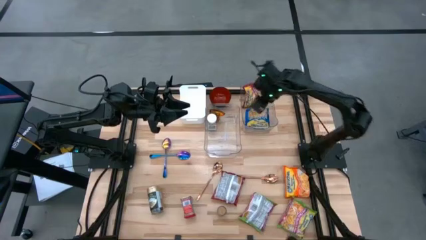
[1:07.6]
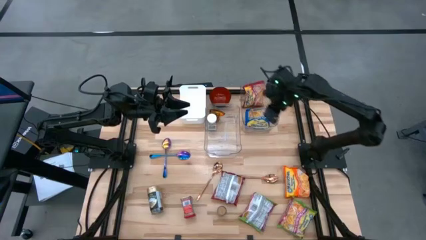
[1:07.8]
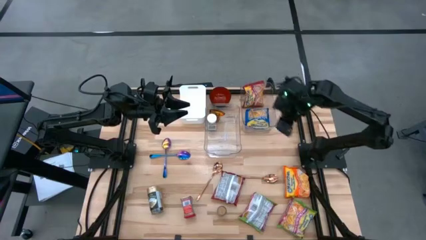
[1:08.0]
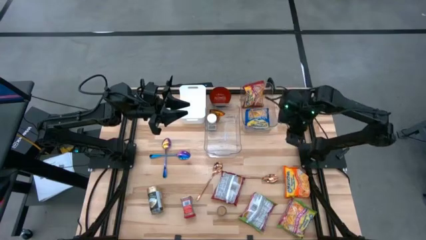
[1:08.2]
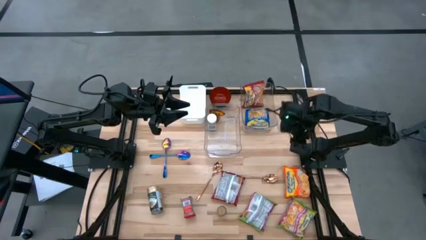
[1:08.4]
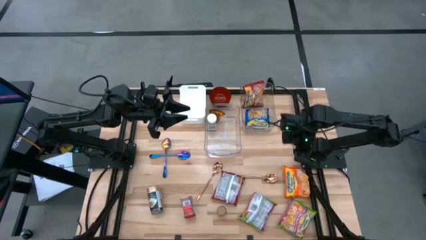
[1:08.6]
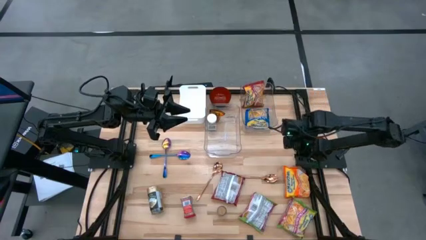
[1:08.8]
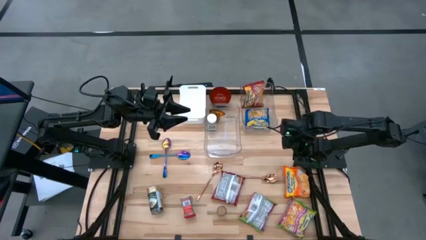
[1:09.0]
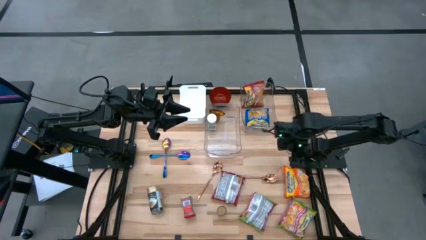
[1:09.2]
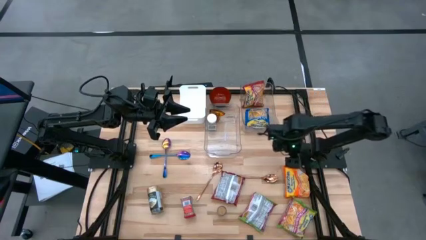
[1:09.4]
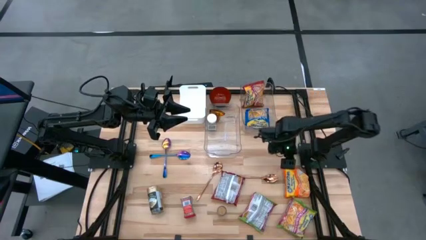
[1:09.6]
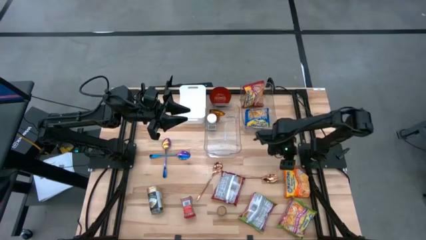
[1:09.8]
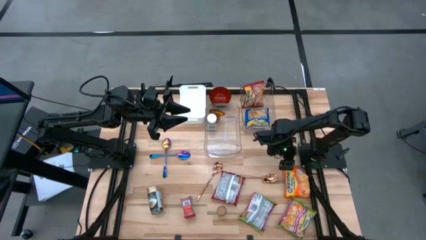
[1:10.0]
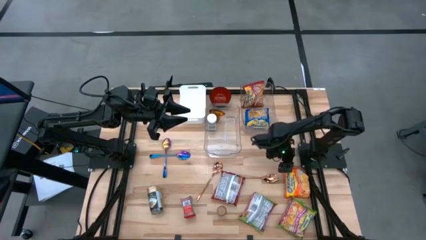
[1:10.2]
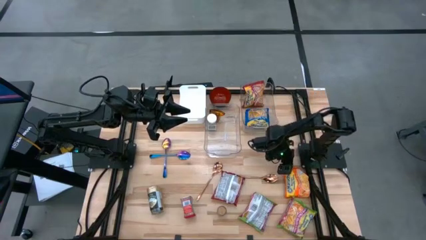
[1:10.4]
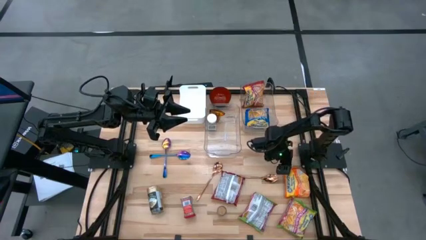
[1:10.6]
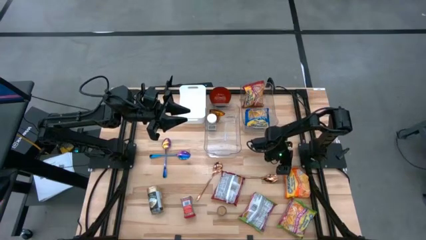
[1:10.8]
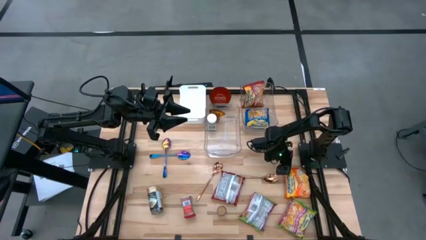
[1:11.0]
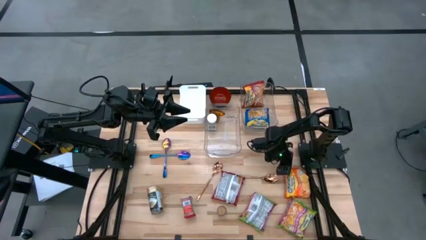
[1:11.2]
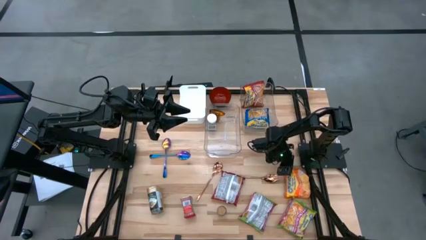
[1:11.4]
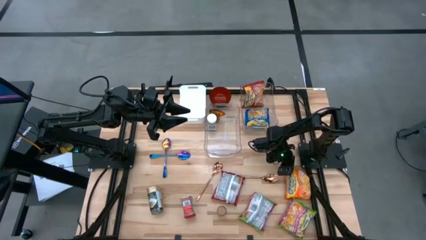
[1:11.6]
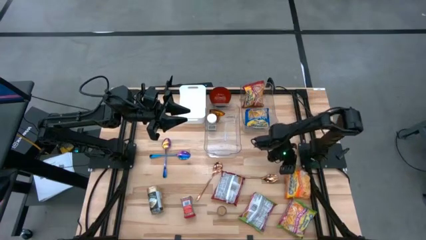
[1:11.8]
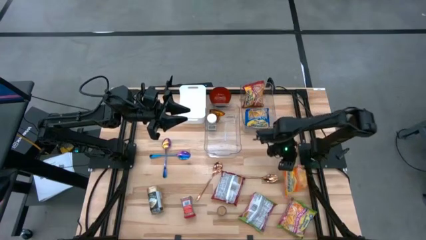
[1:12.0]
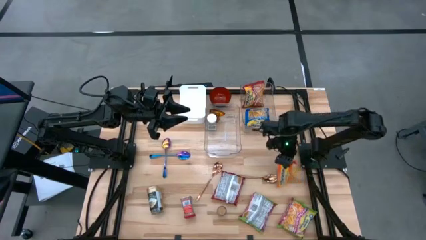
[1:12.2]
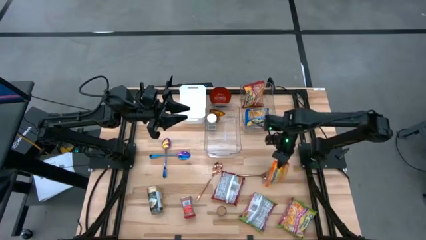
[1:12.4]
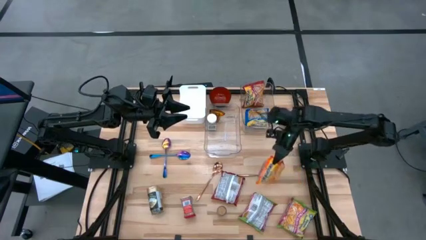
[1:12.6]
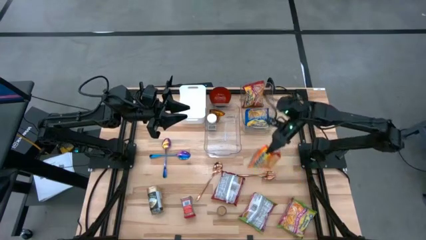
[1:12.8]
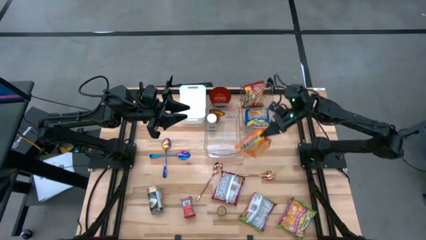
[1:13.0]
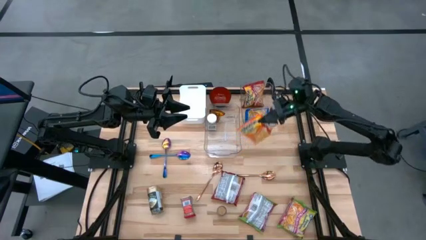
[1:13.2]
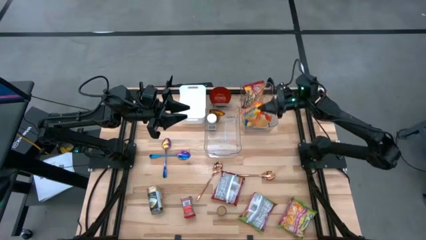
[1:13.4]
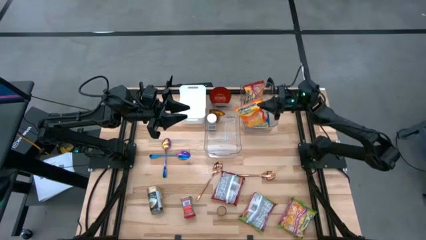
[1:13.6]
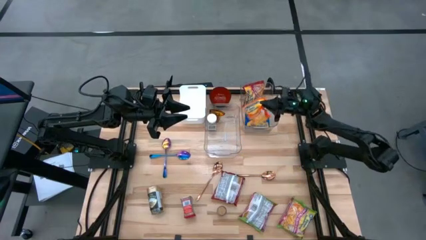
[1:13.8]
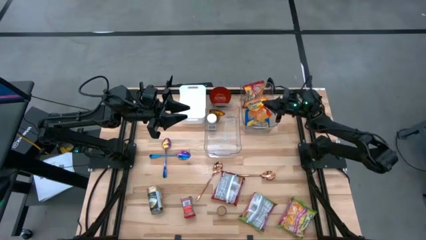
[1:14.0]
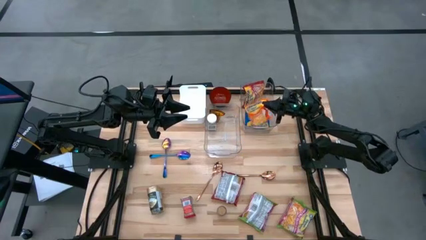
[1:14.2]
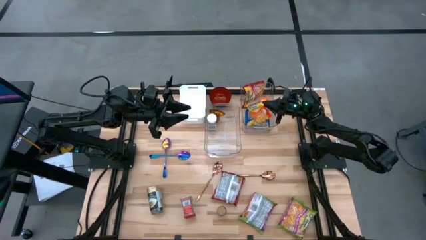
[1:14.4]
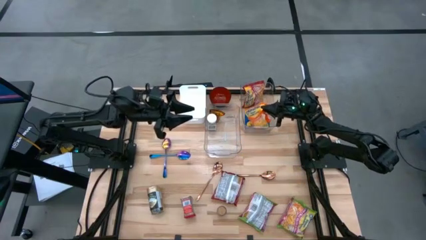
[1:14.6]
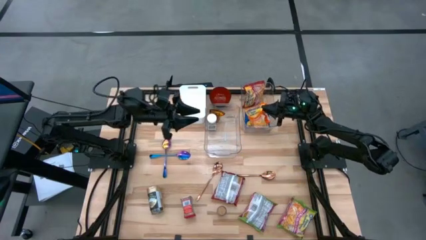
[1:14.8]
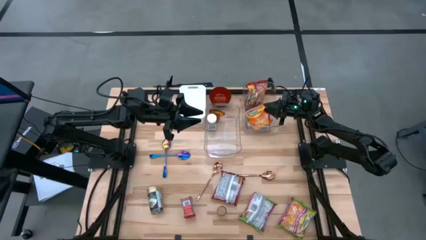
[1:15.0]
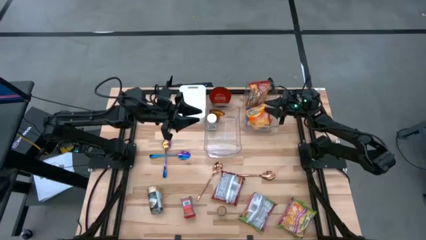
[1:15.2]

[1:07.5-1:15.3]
Task: Pick & Place Food Item
Put the orange noodle pack into the right transparent bin

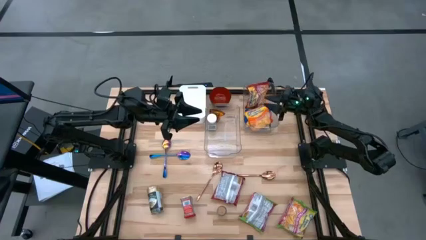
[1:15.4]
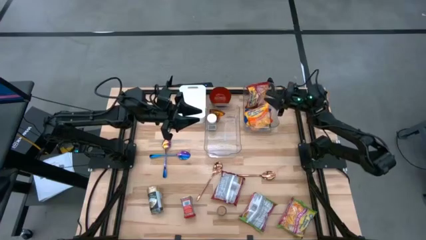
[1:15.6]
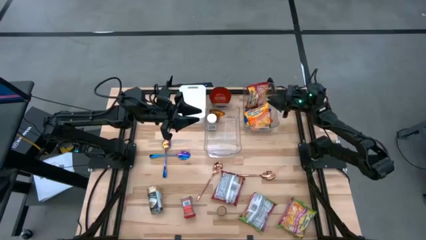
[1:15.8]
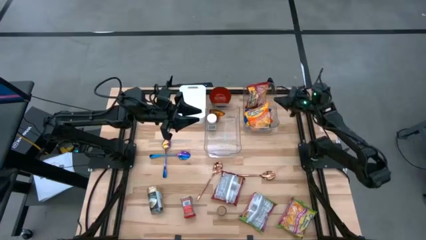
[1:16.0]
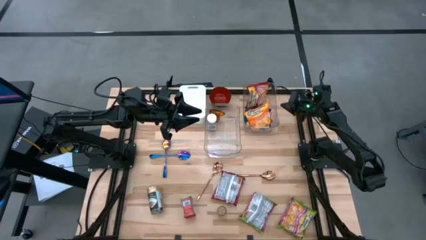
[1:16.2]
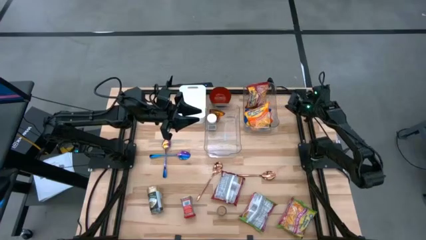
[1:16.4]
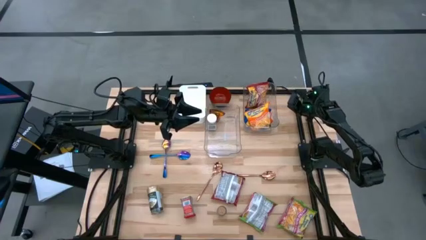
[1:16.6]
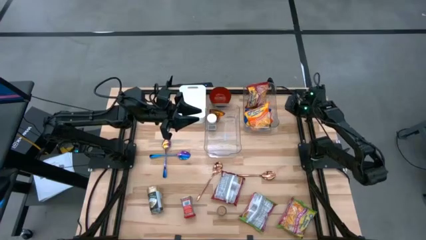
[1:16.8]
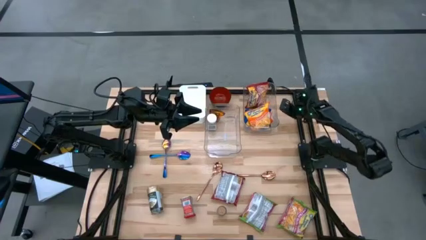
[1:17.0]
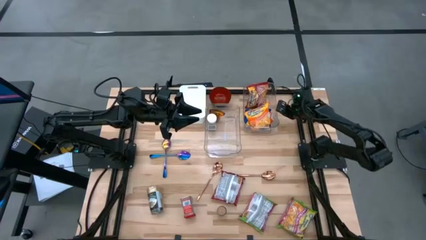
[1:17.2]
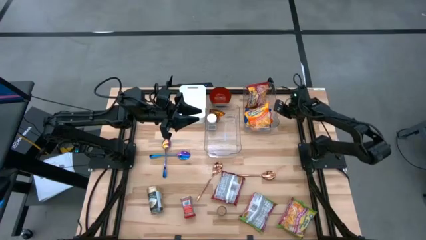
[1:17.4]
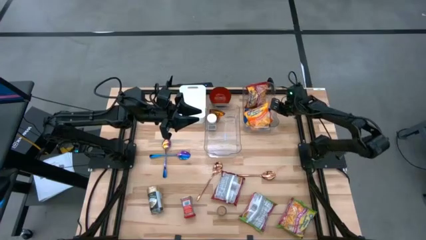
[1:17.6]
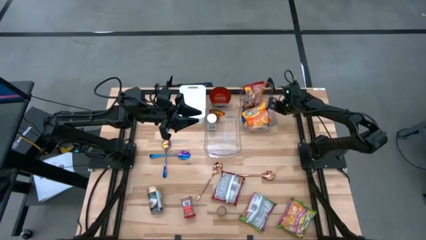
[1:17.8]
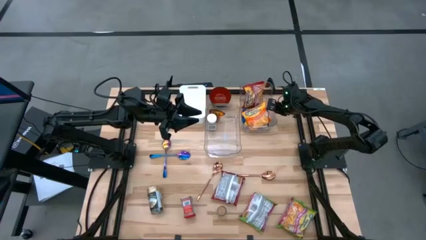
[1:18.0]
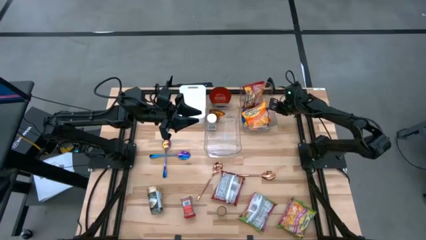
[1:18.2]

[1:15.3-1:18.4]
Adjust the right transparent bin

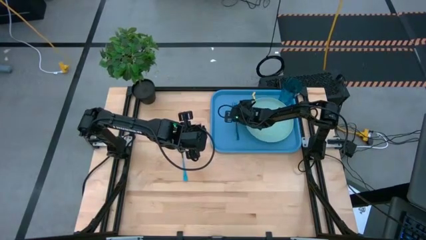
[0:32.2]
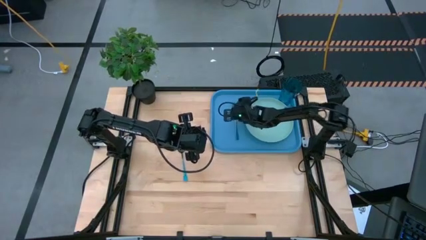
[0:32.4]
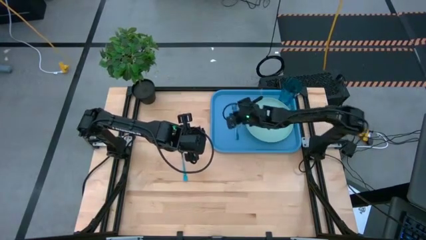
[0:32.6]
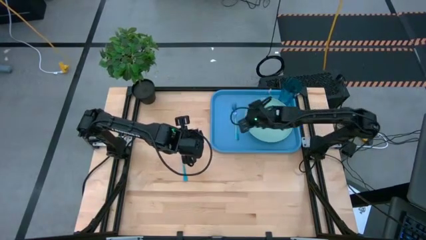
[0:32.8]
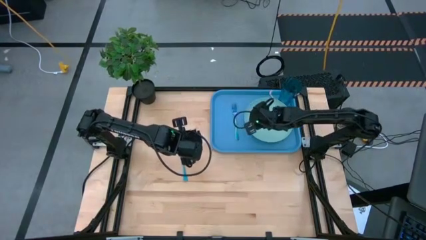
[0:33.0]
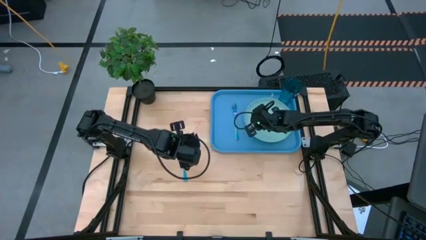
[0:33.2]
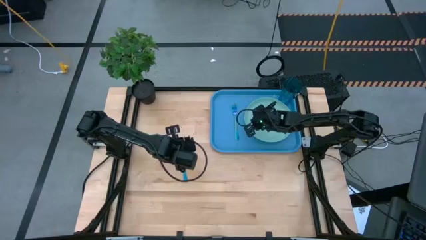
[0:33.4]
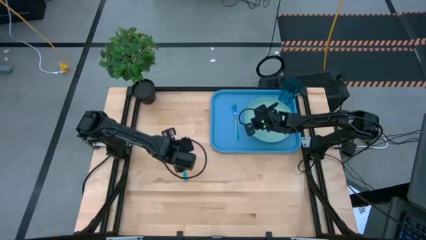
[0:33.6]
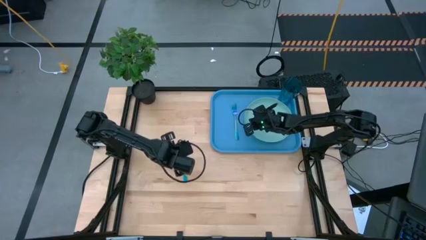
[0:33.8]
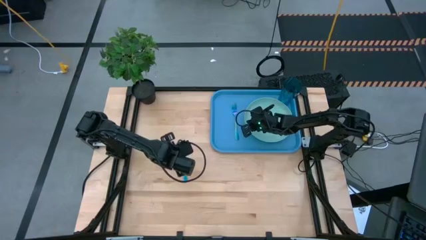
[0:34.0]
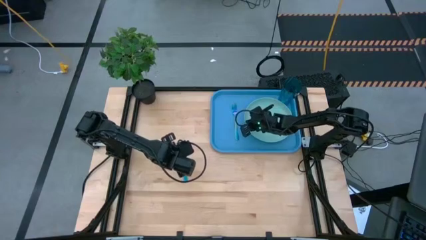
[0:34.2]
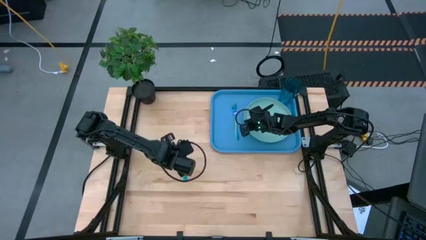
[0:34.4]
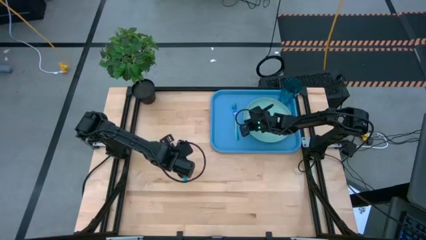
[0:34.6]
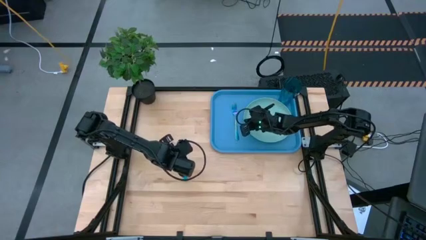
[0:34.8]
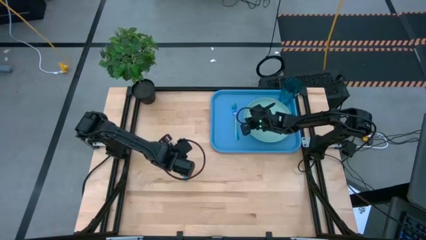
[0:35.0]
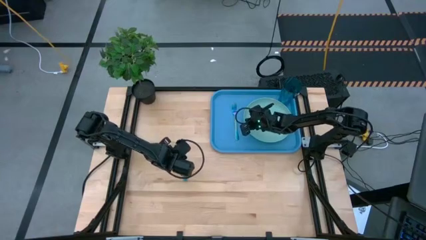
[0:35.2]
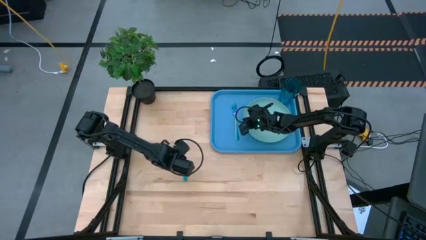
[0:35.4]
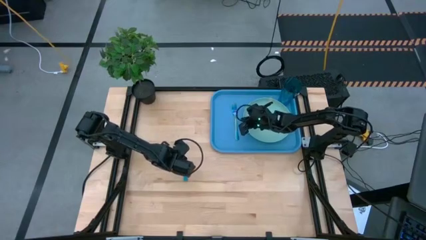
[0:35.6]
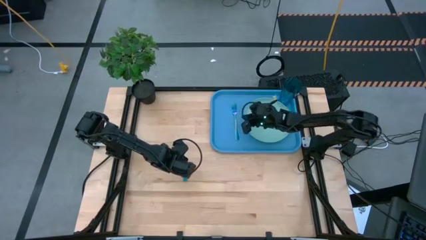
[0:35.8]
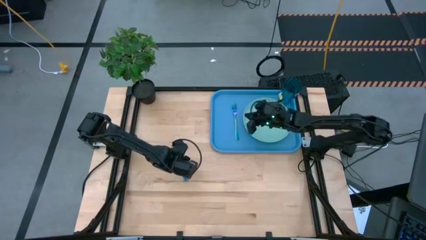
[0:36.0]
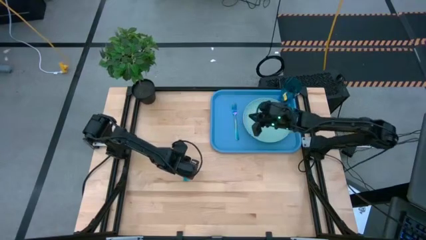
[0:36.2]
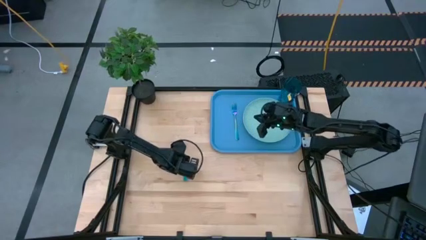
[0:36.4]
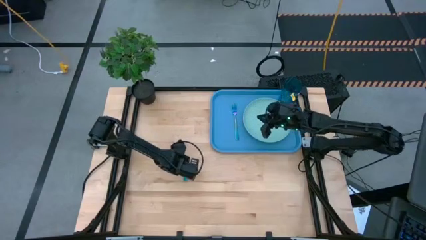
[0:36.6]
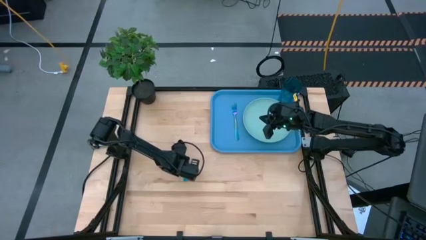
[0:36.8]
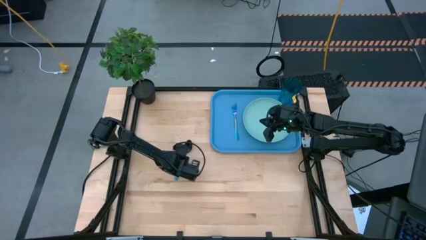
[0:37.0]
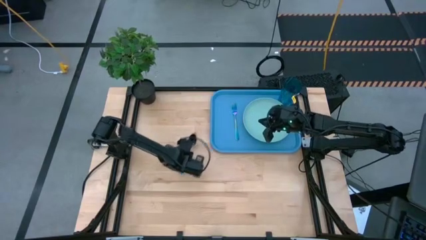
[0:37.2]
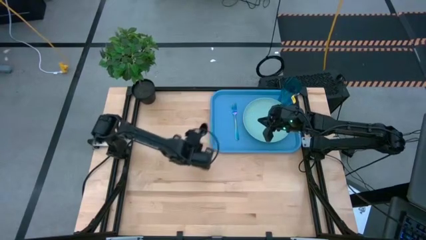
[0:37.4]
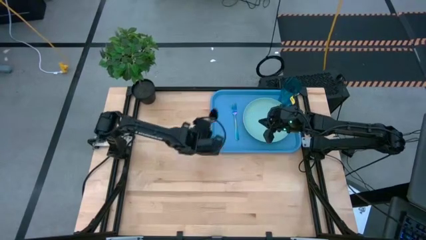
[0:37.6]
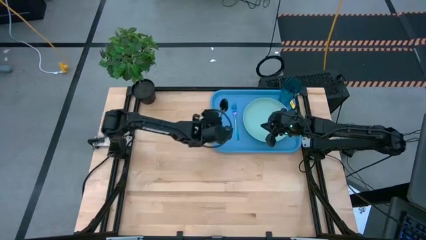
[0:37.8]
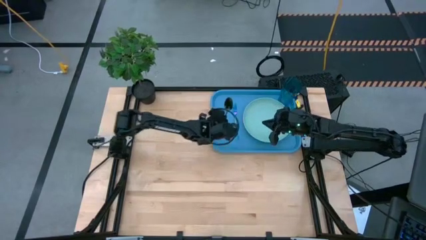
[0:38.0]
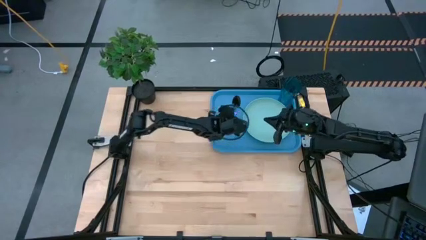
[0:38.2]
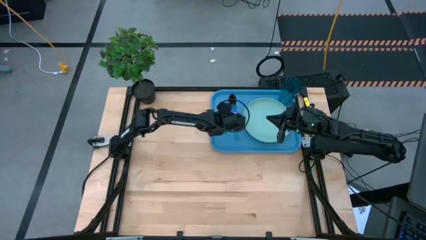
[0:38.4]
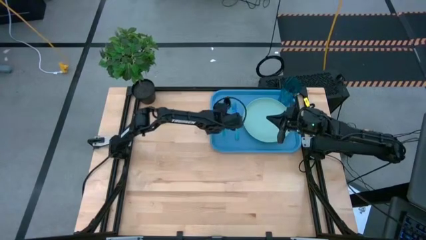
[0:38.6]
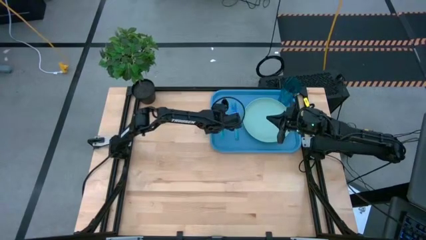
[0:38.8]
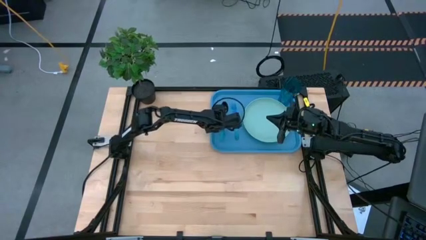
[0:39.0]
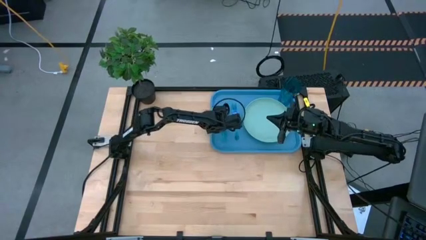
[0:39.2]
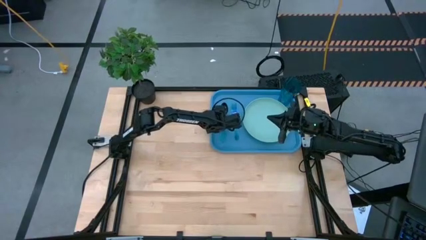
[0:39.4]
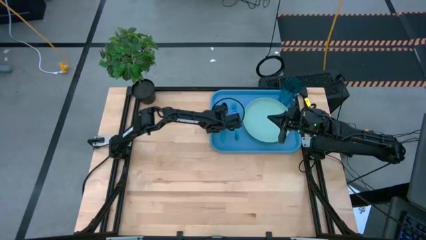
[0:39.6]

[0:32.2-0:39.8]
Task: Pick and place plate/cup/fork/spoon on tray
Put the blue spoon on the left side of the purple fork in the blue serving tray
